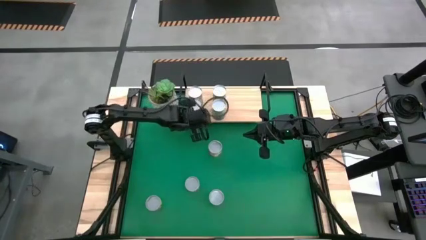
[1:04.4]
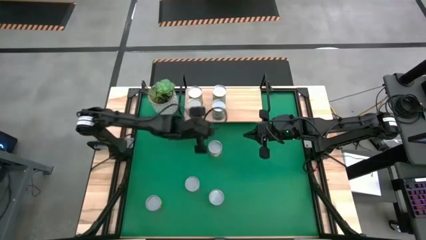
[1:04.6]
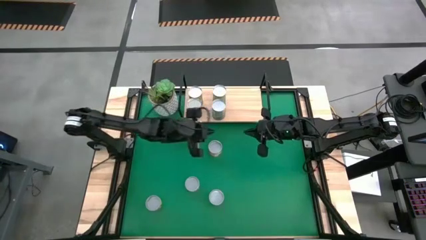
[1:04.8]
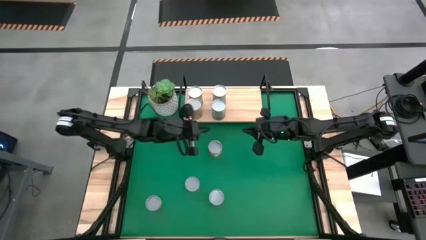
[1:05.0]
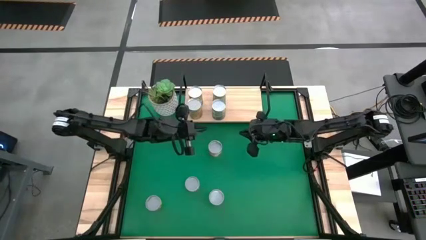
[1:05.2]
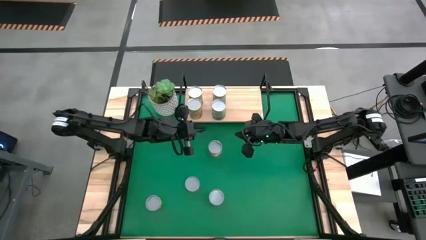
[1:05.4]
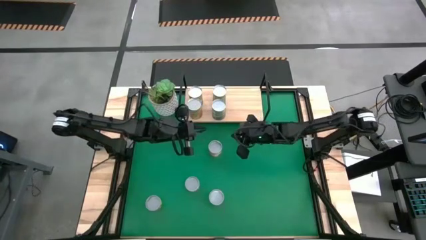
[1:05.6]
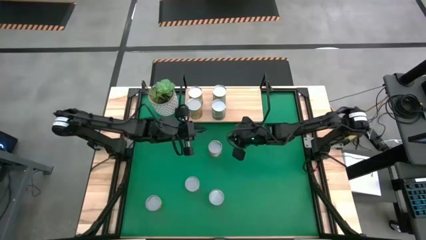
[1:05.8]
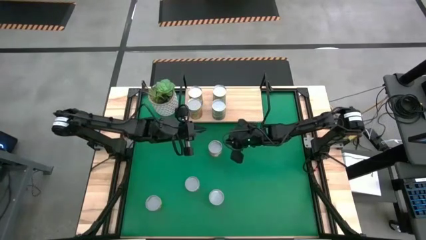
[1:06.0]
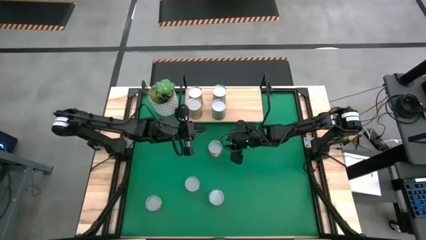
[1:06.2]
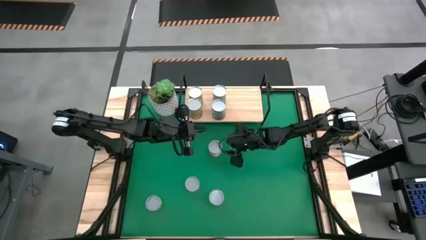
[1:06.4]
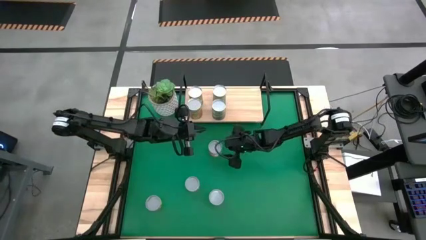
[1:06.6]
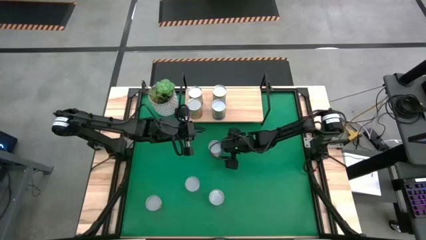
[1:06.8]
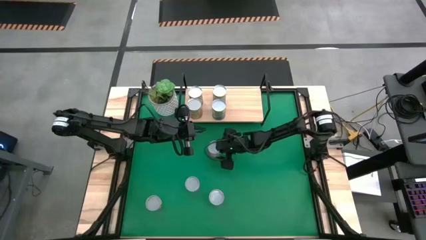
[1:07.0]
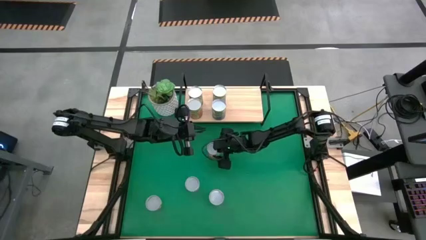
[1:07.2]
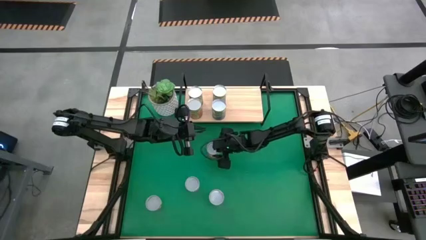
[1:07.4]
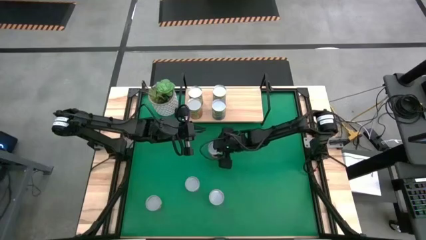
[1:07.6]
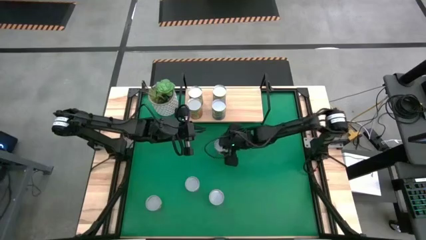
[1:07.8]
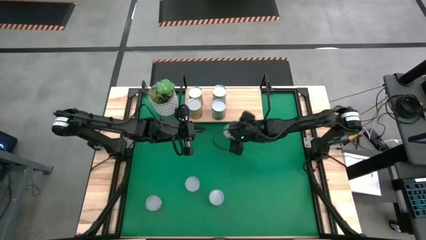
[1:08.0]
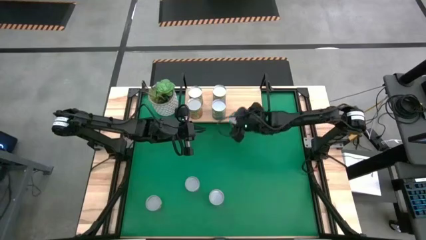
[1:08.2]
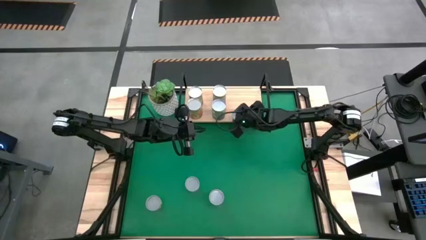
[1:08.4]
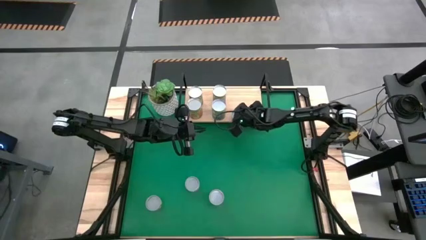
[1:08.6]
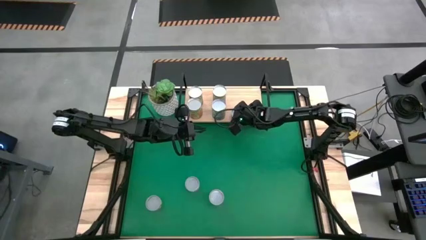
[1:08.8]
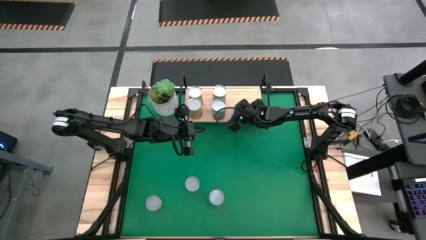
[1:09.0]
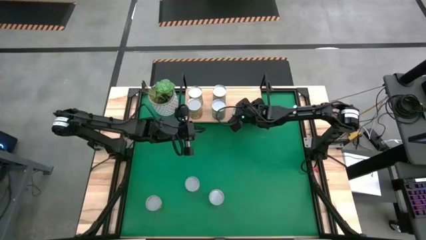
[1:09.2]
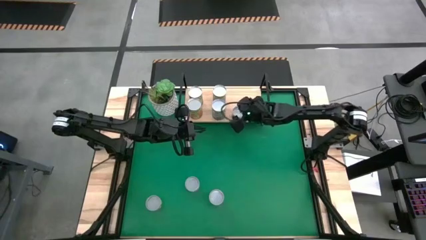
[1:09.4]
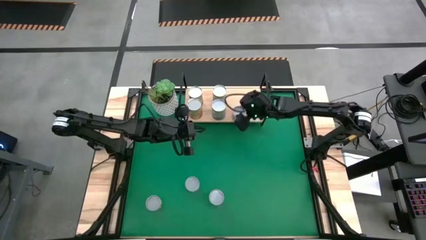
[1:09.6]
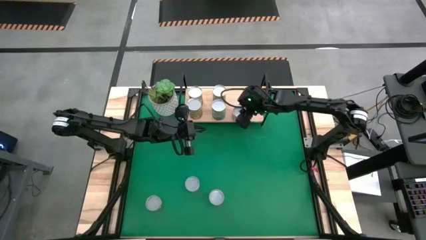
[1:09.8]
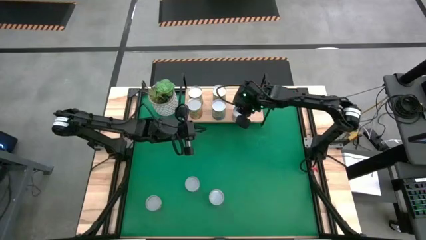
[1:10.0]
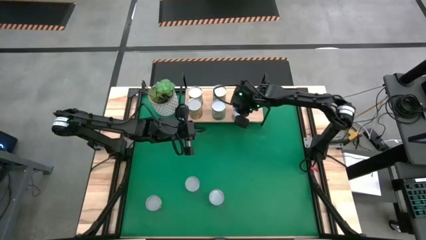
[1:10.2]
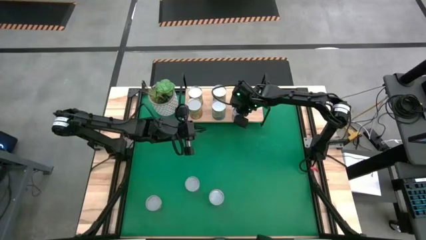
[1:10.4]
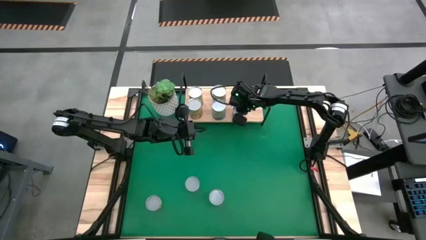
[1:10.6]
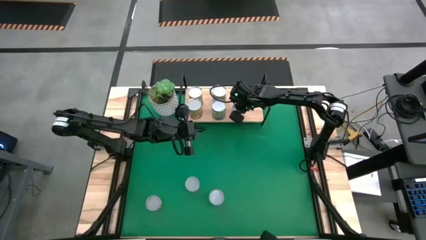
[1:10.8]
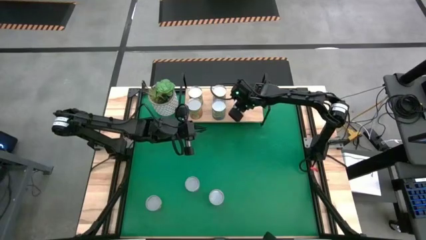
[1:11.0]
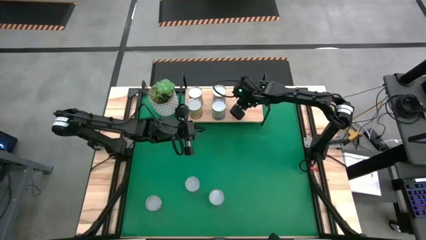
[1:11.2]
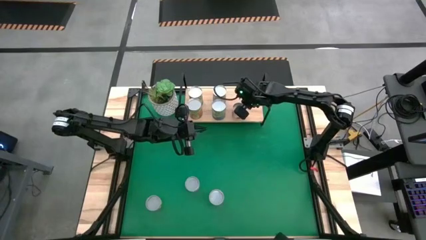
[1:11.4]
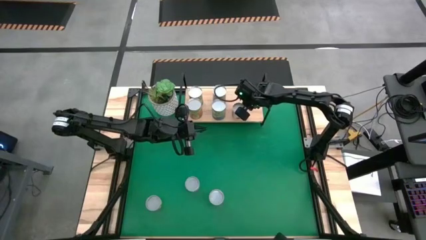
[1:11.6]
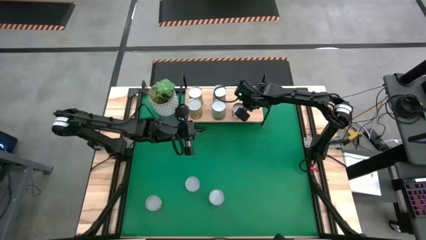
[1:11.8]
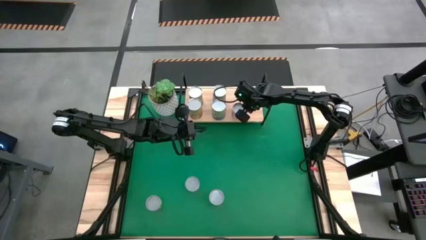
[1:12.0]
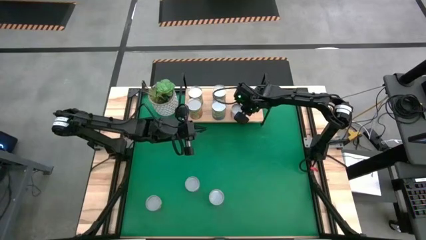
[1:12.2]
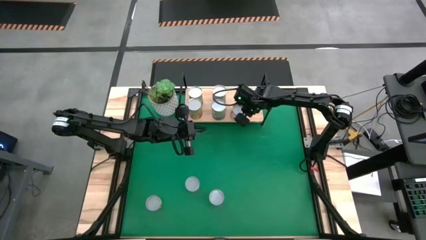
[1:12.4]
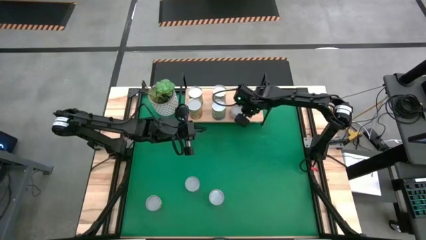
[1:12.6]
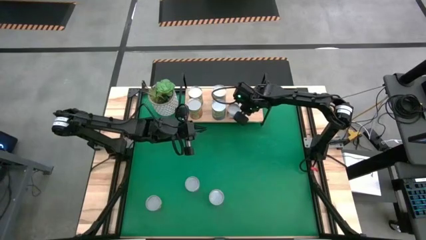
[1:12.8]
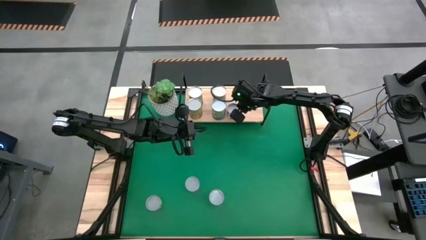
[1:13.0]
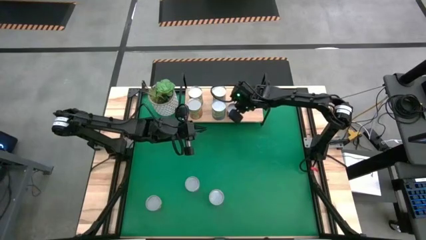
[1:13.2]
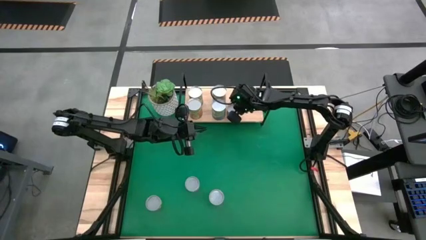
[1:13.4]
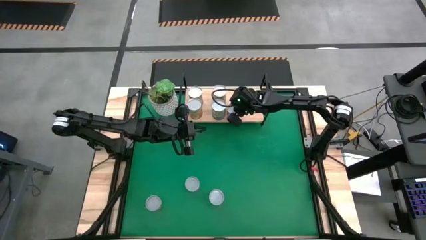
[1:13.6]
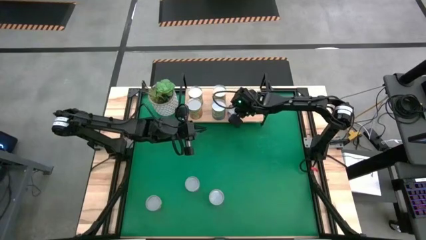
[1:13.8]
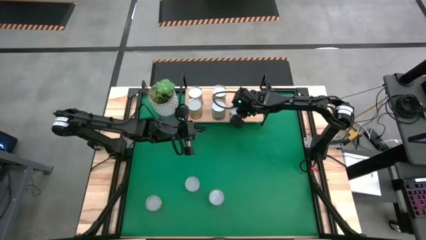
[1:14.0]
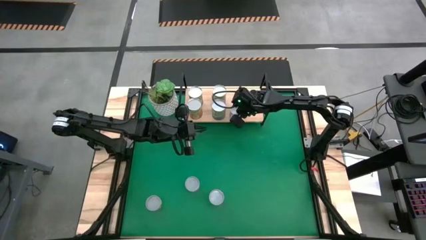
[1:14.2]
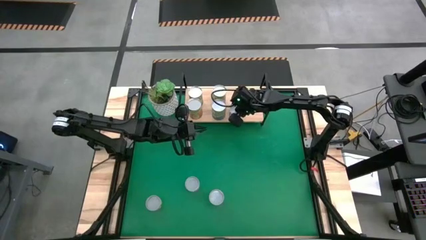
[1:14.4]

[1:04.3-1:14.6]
Task: Pick and place cans onto a shelf
Put the canned meatballs on the shelf

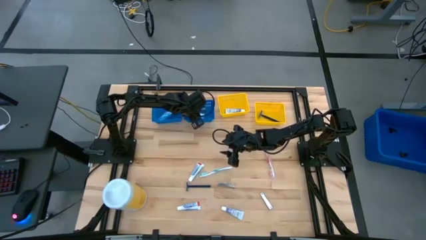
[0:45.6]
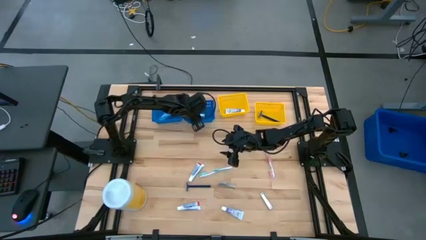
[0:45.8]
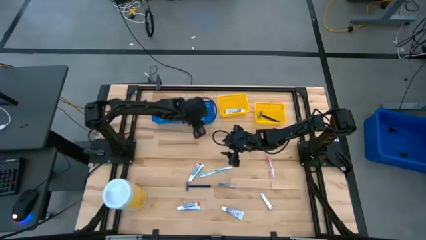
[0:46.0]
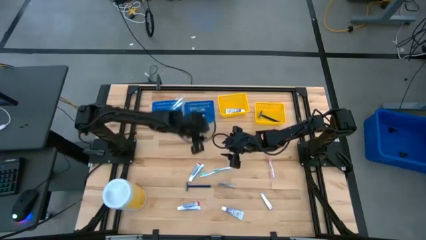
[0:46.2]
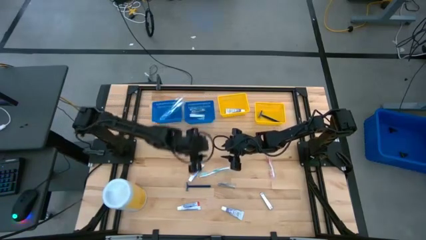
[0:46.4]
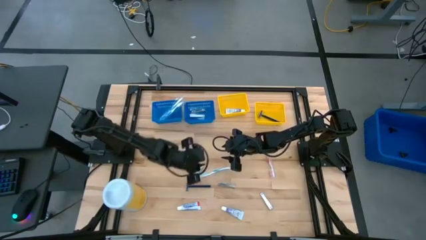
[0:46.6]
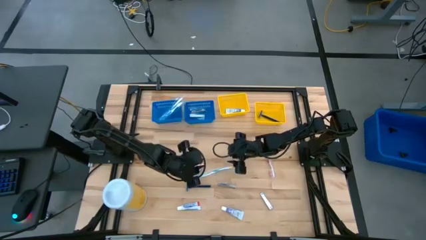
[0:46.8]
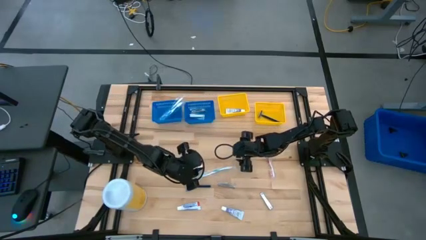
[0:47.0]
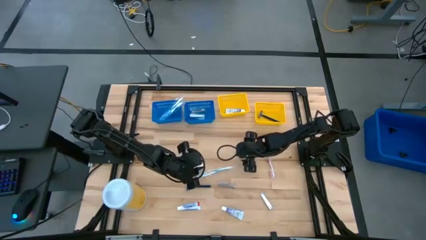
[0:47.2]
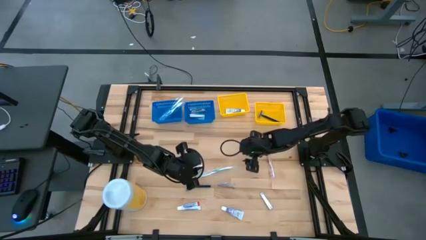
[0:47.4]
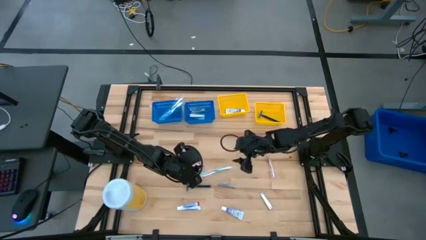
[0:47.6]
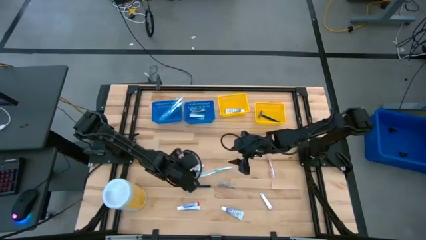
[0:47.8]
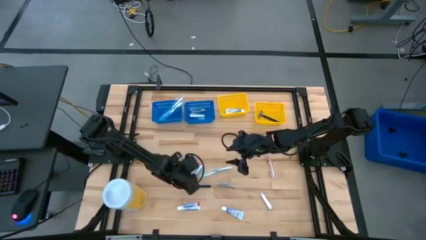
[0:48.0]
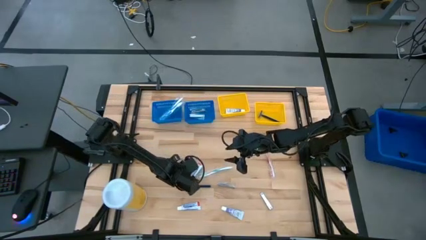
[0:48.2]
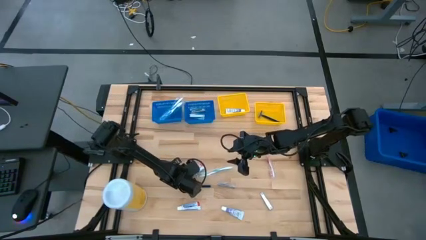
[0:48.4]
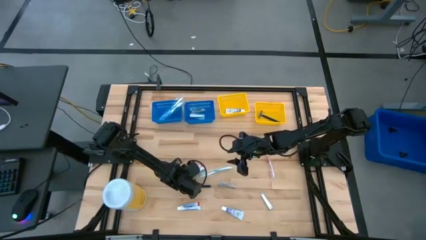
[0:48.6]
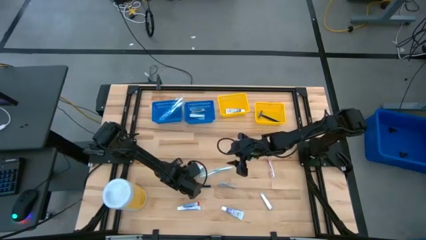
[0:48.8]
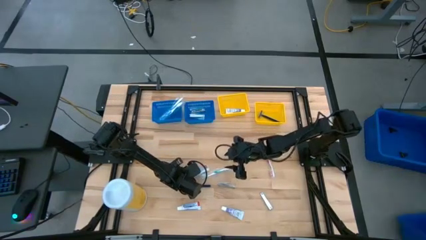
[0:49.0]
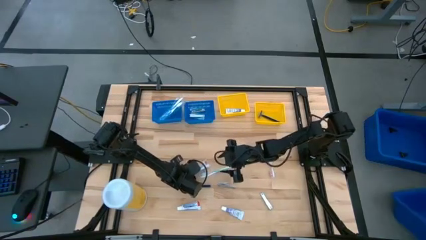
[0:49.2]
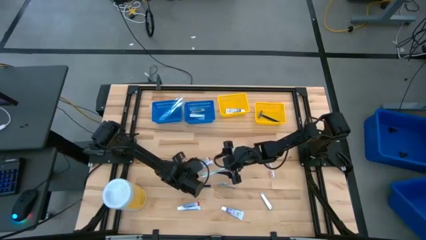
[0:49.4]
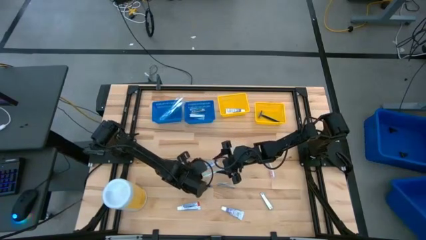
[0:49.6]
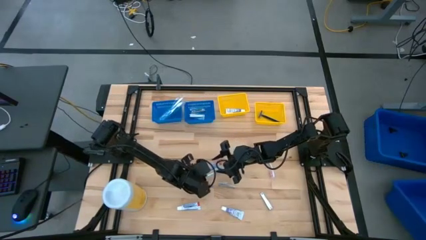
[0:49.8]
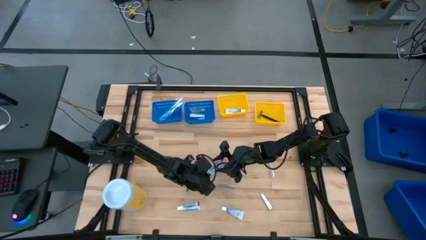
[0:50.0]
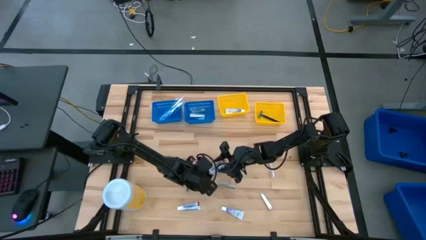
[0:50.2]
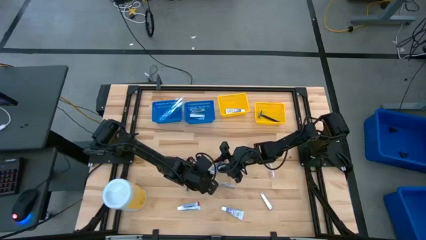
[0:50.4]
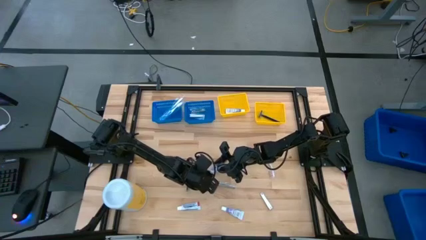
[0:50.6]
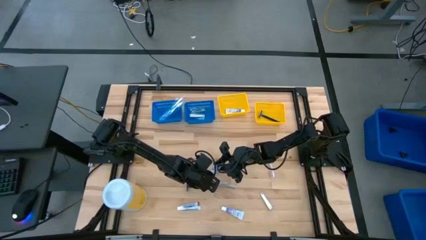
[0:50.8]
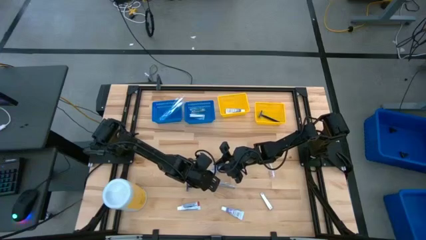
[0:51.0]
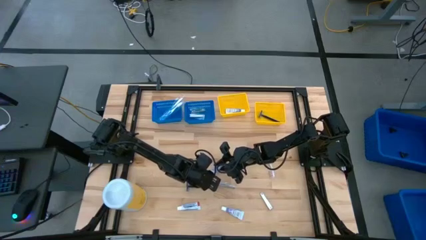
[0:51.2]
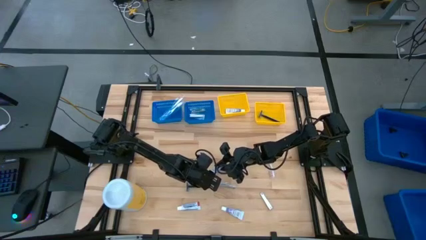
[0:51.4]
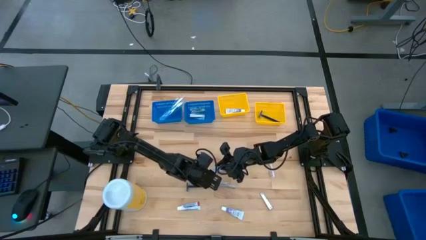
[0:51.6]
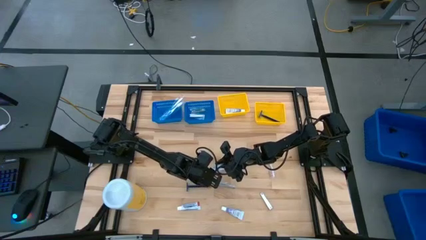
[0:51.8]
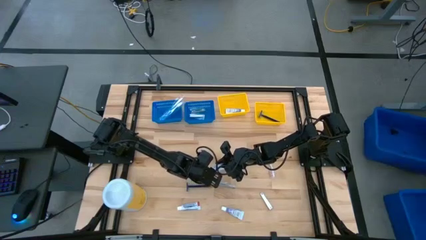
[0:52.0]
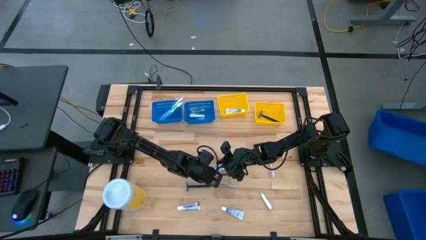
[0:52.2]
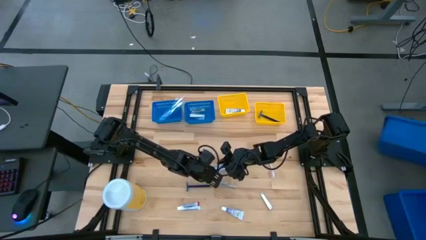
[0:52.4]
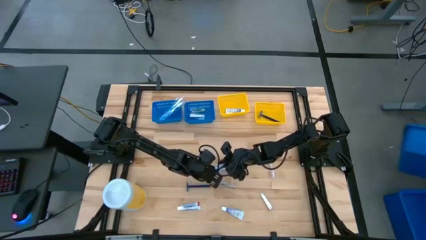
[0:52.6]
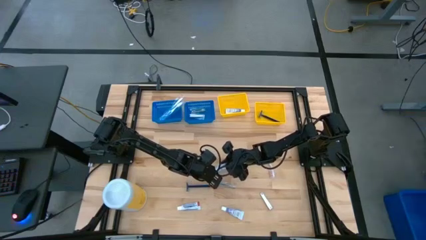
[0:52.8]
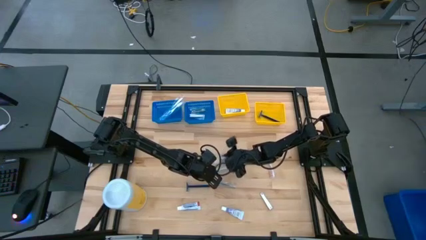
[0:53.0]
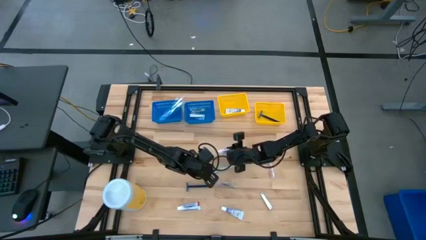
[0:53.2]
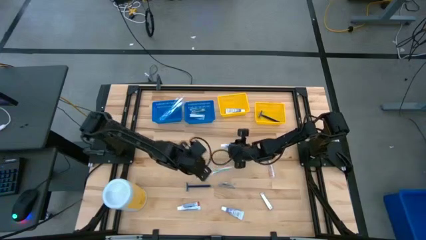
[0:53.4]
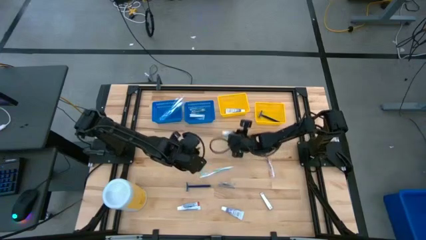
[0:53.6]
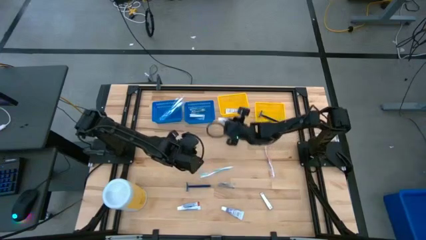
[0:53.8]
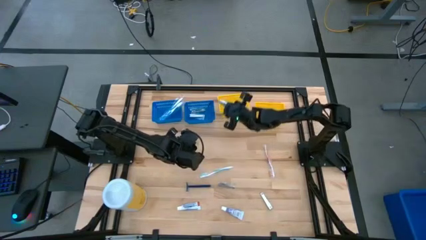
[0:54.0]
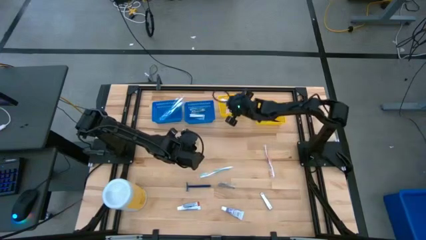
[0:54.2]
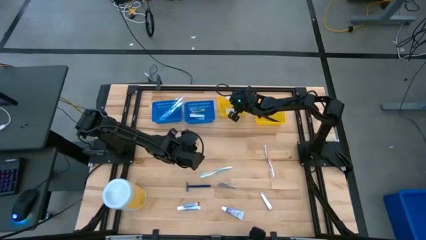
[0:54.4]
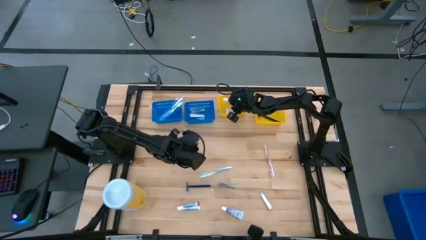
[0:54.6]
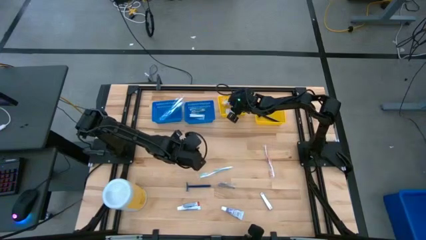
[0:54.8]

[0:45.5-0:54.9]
Task: Pick & Place Travel size toiletries
Put the white toothpaste into the left yellow bin
